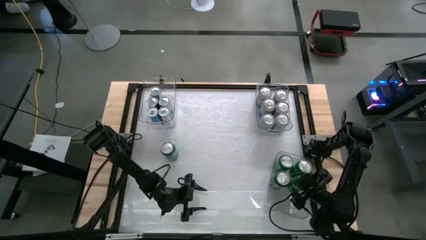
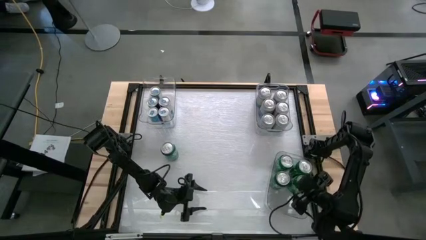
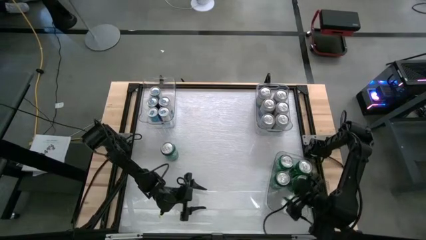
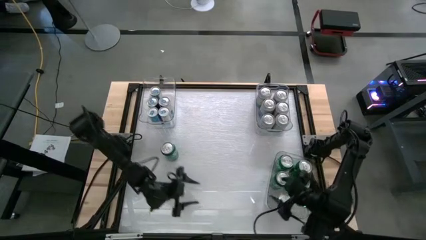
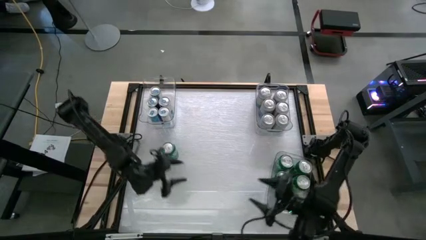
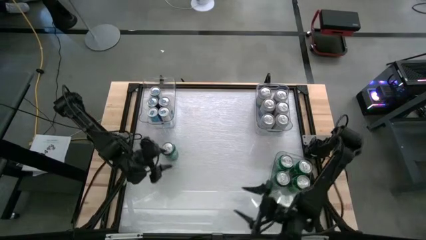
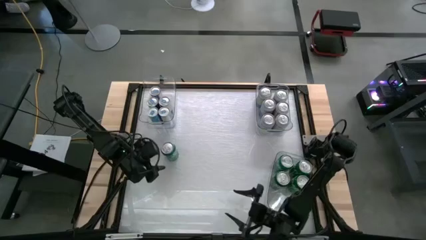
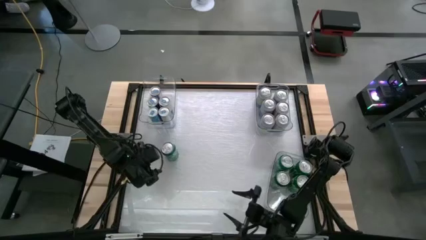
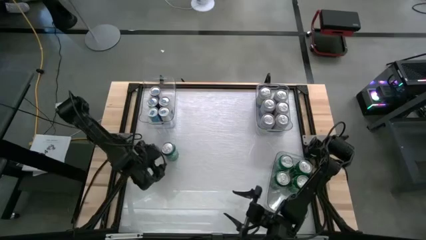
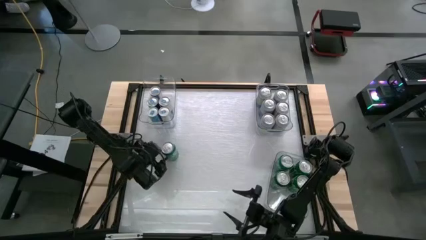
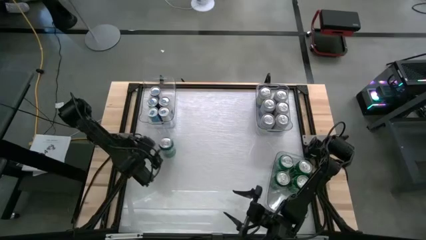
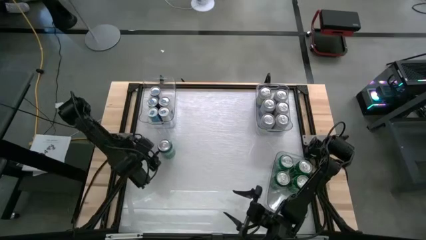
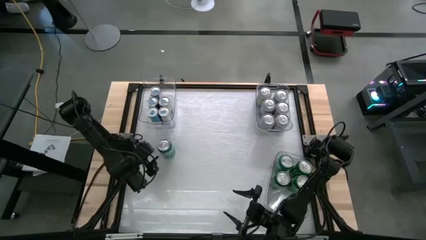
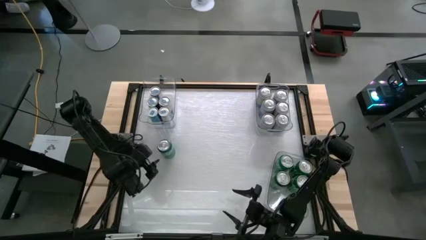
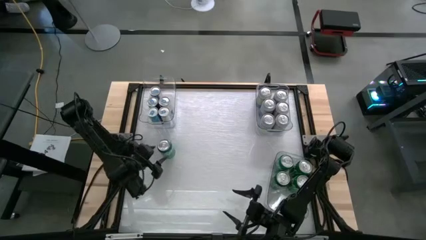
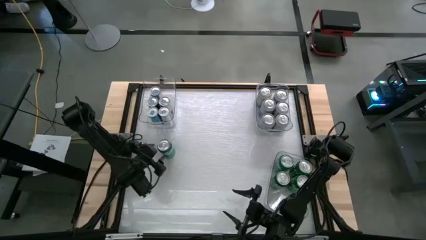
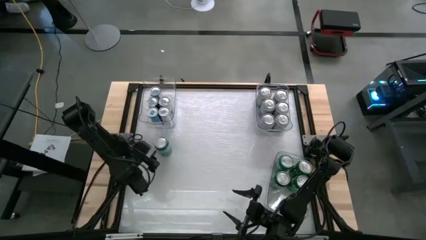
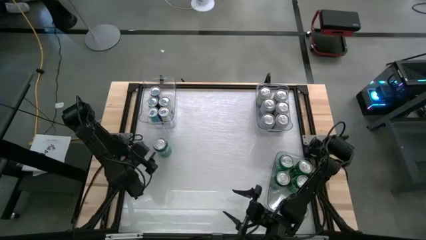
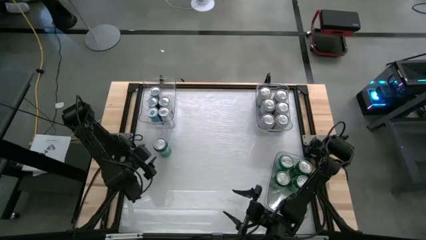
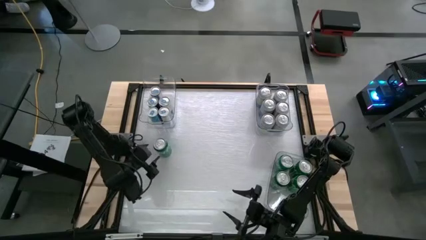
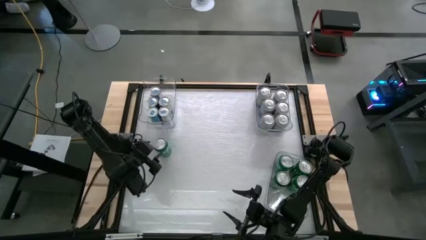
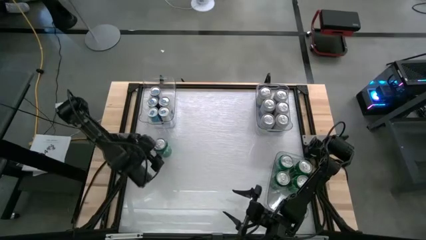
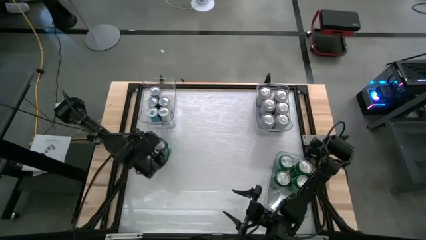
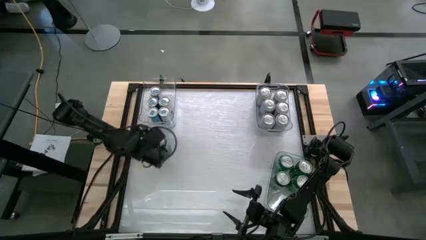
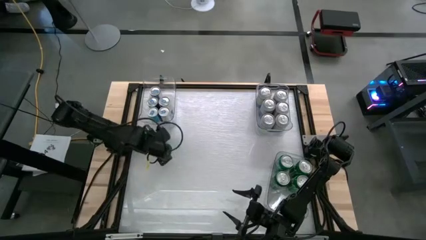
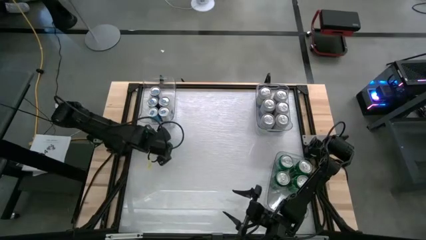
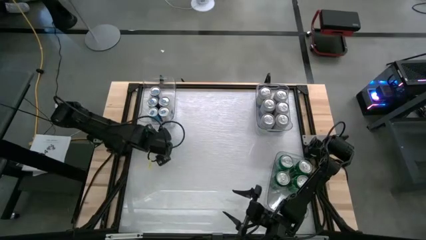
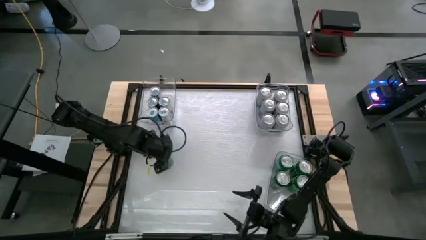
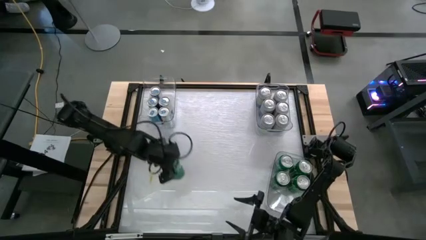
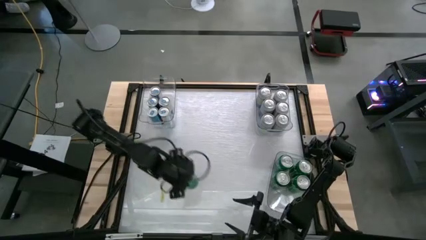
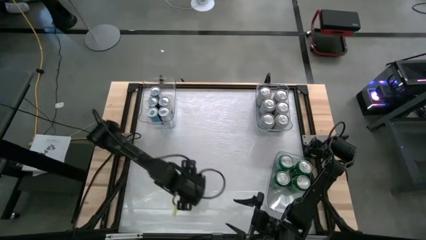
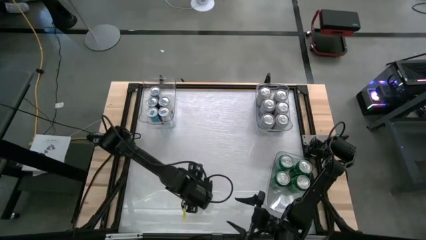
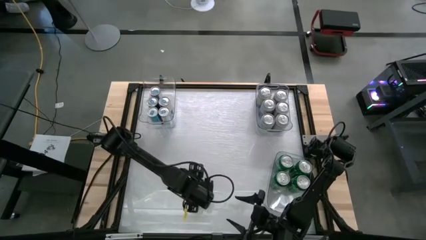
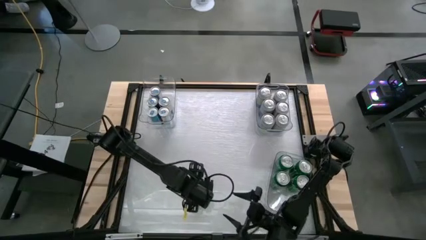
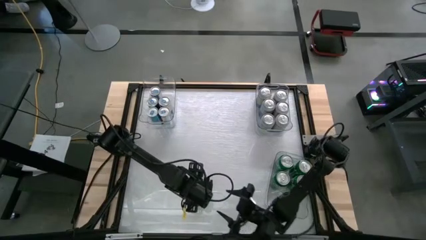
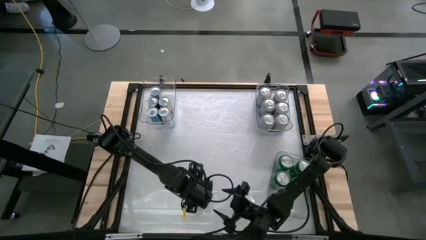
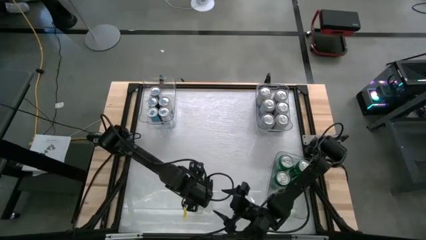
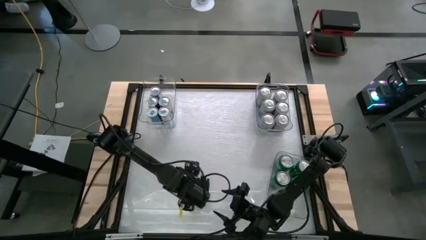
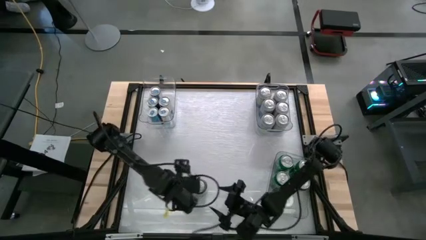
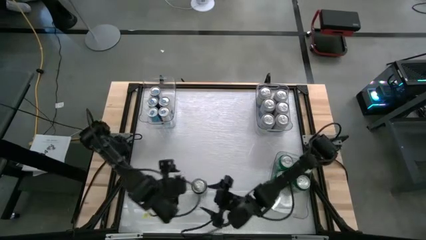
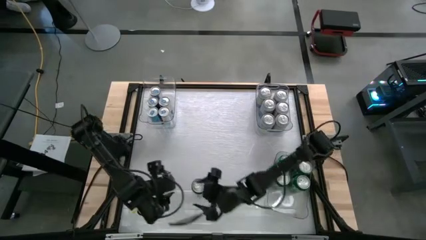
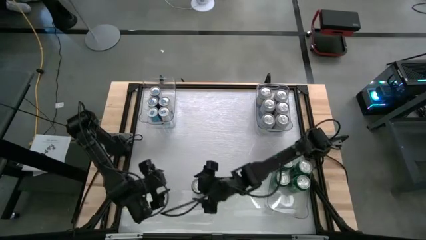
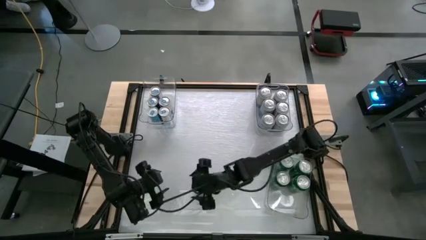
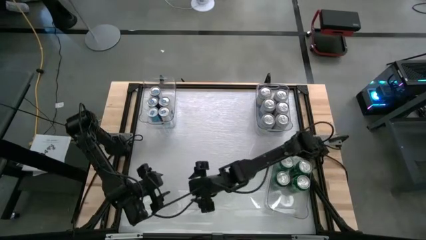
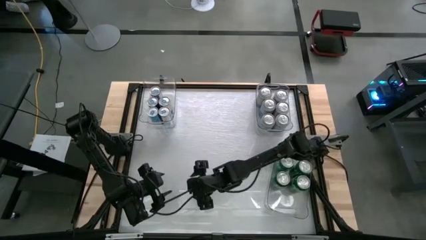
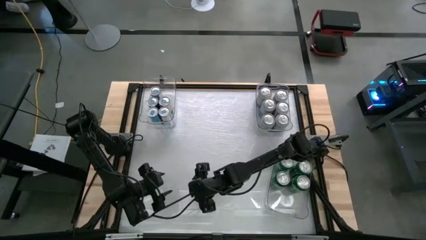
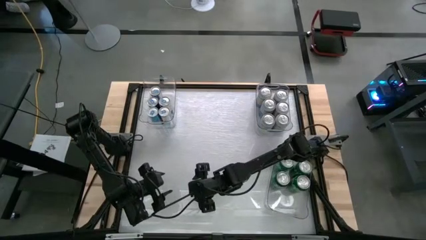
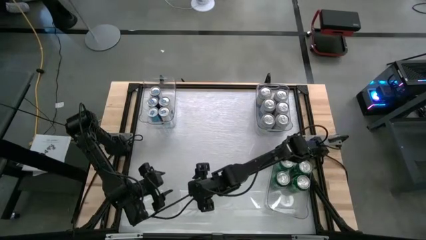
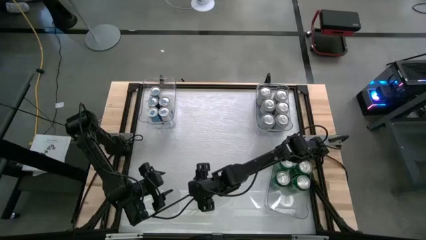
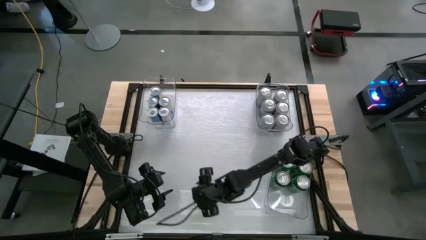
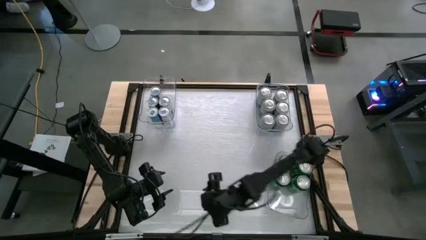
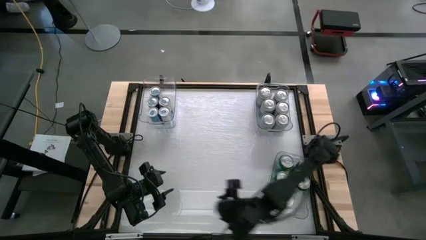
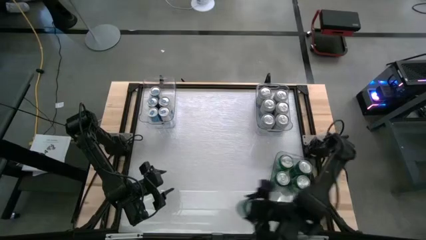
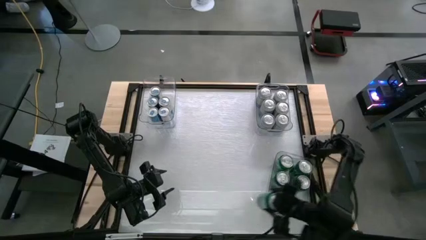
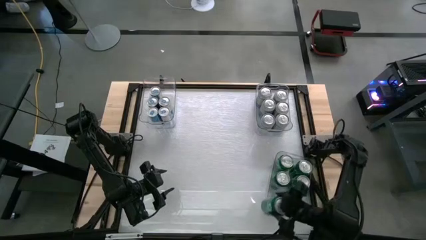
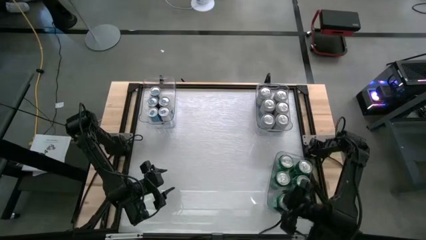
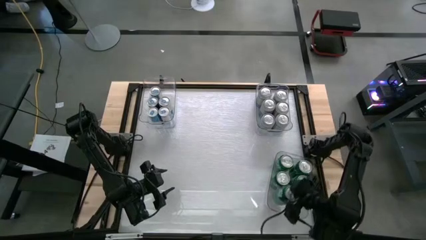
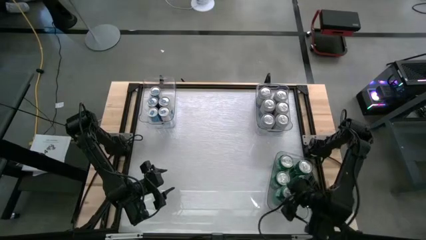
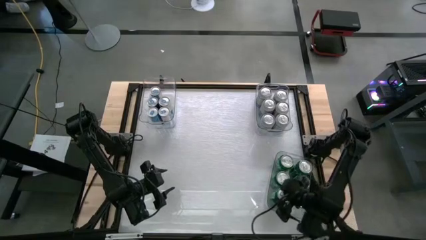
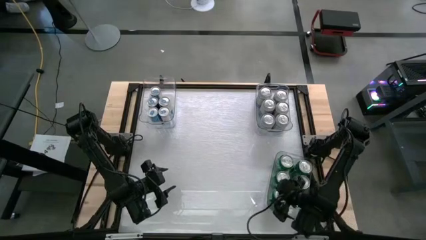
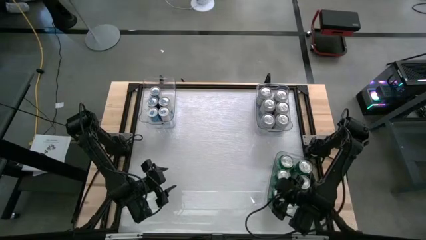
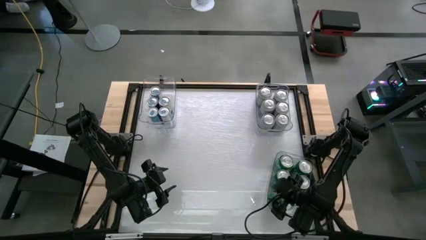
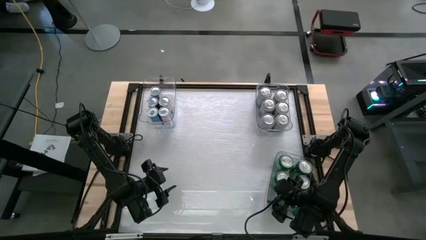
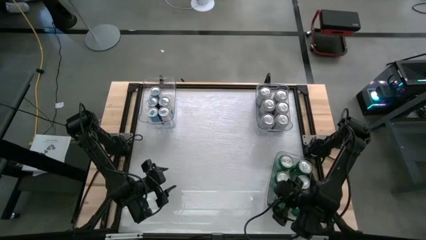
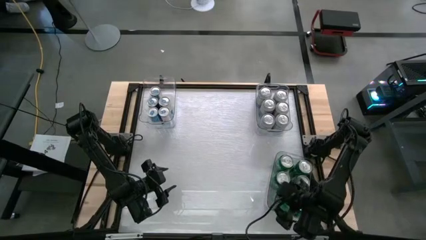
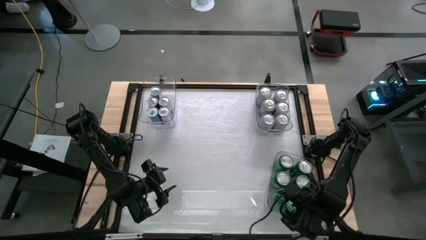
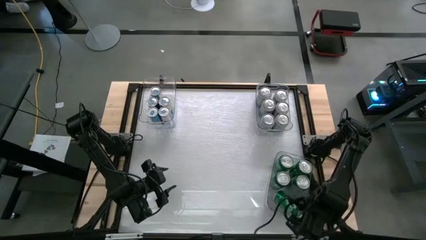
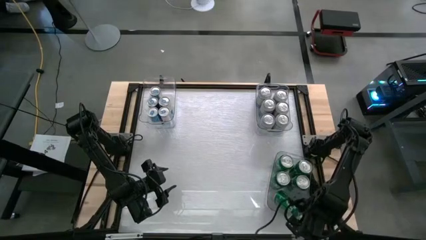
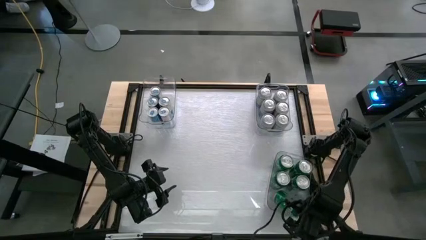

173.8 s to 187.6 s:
Task: Sort soda cans
Put the green soda can into the bottom transparent bin

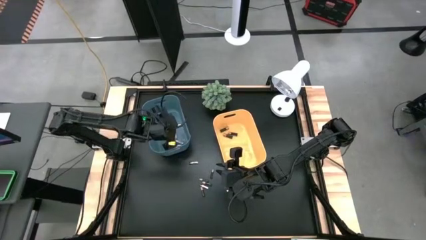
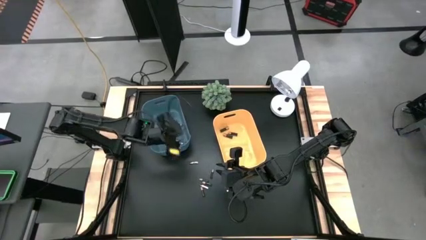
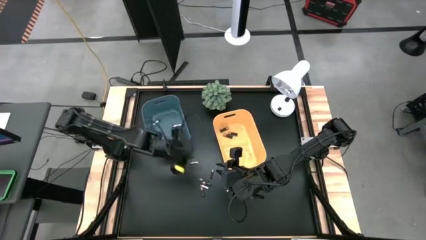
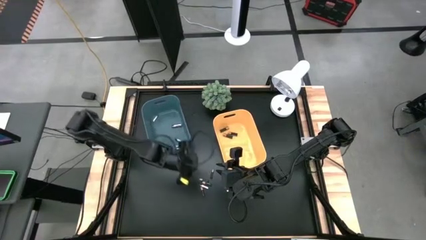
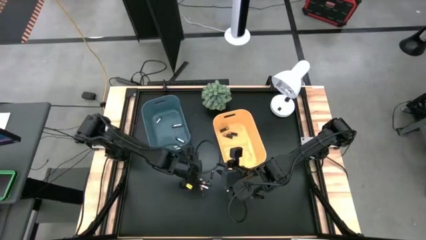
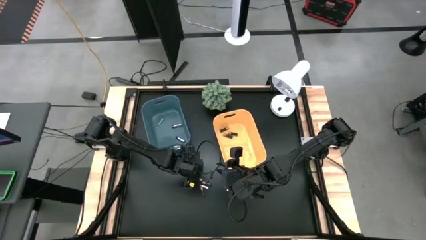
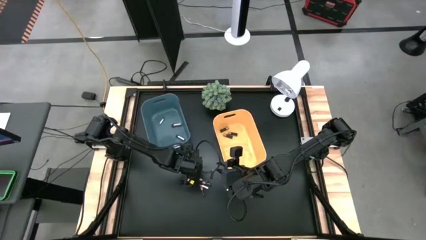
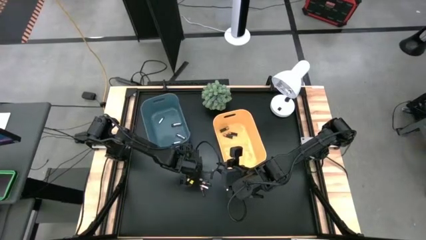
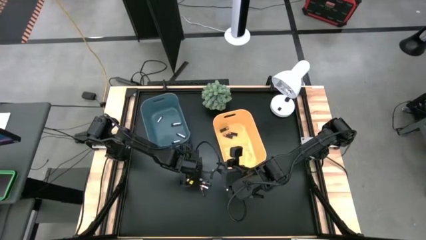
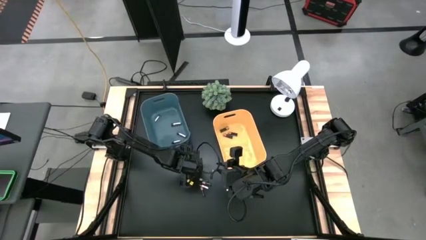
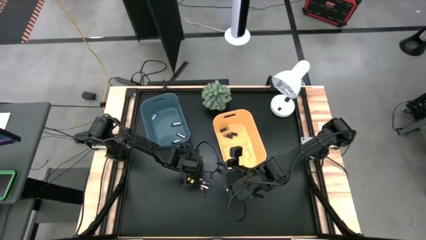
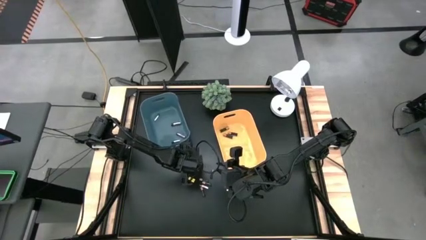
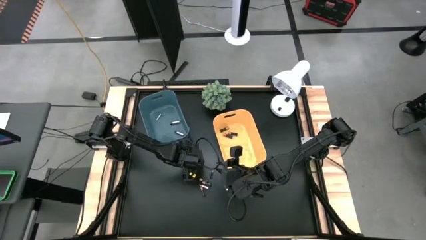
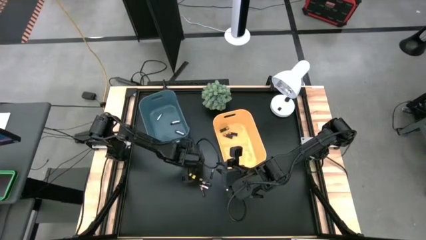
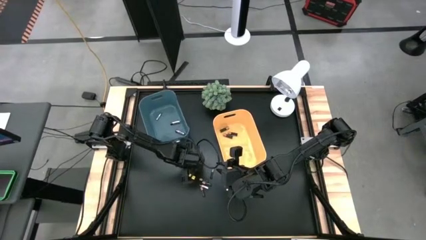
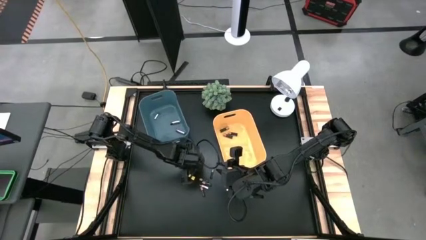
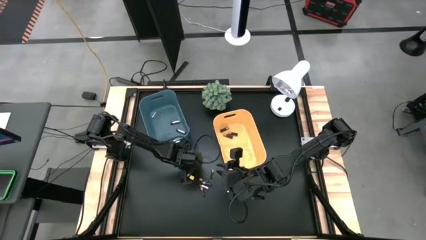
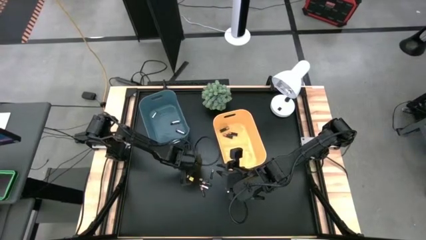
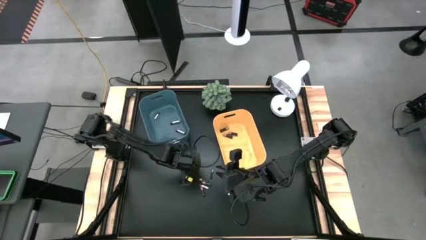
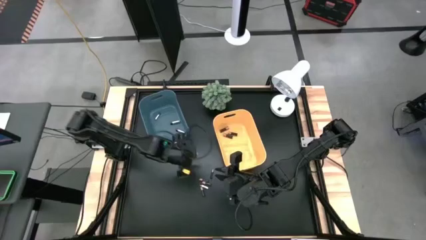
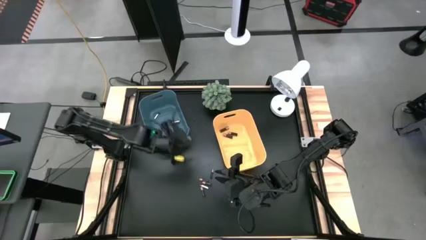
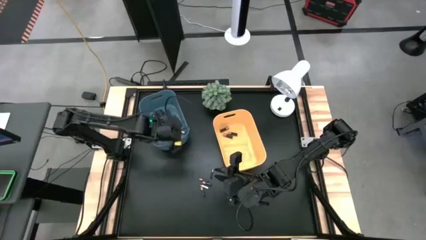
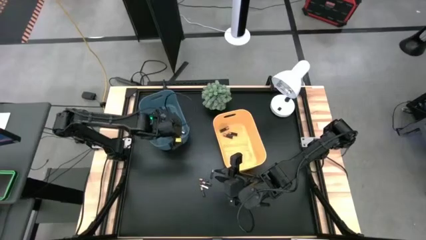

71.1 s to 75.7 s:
Task: Sort batteries
Put the silver battery into the blue bin
